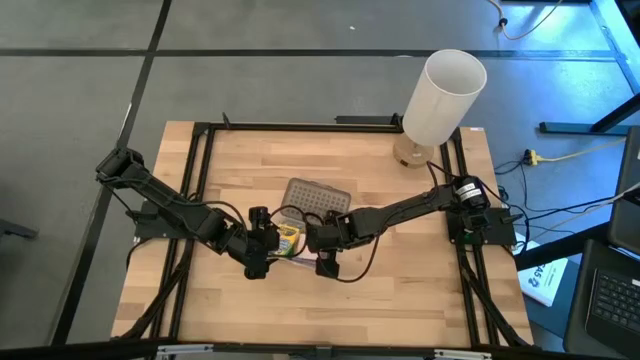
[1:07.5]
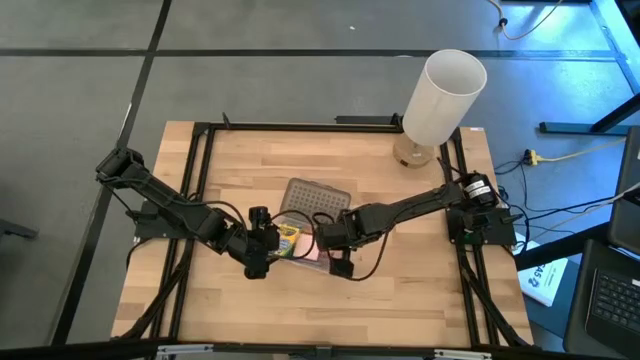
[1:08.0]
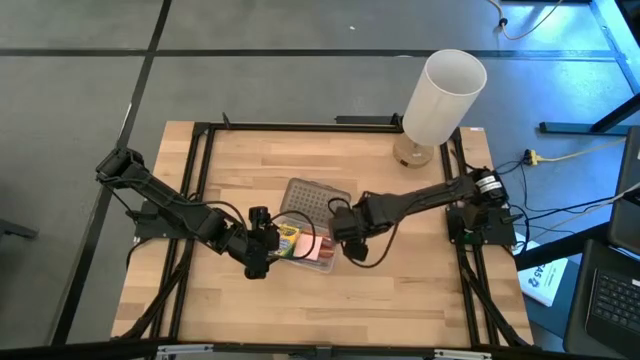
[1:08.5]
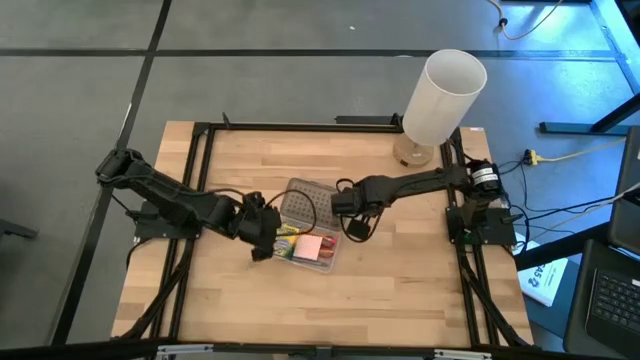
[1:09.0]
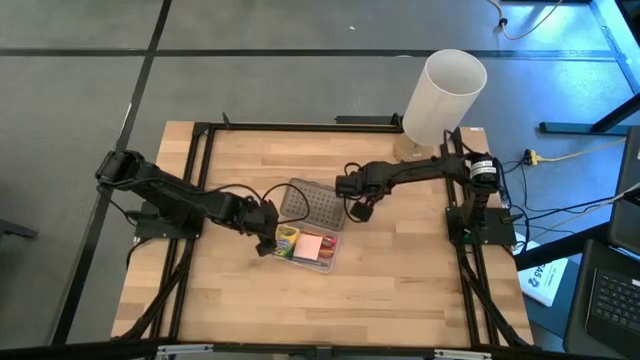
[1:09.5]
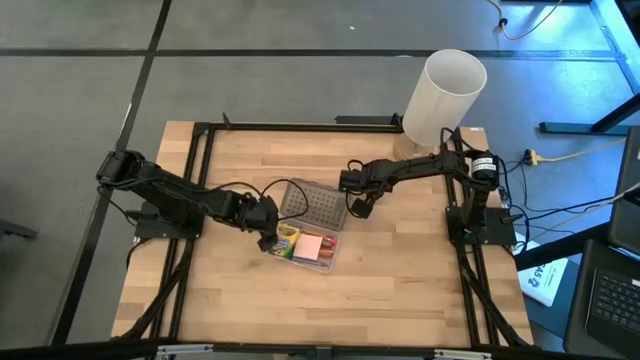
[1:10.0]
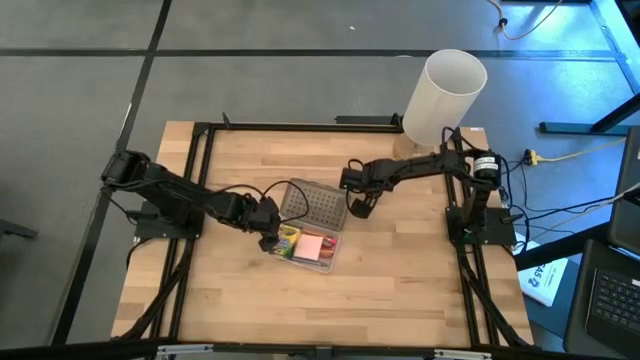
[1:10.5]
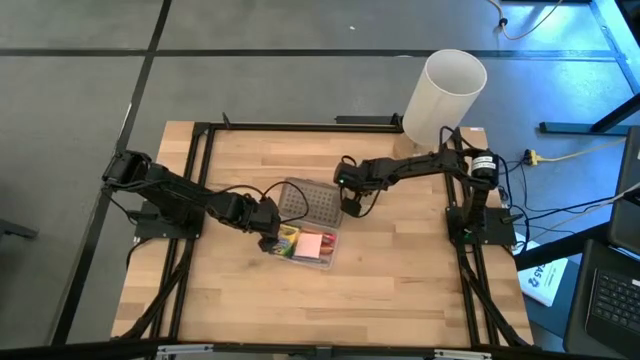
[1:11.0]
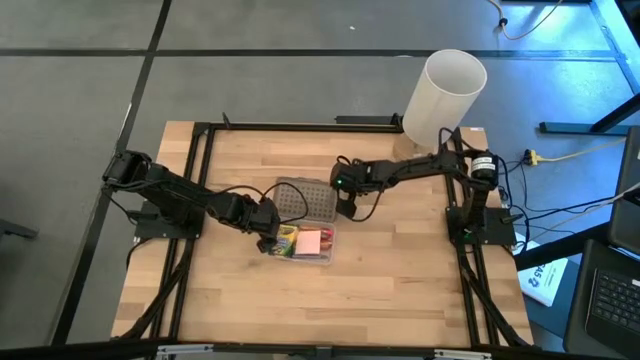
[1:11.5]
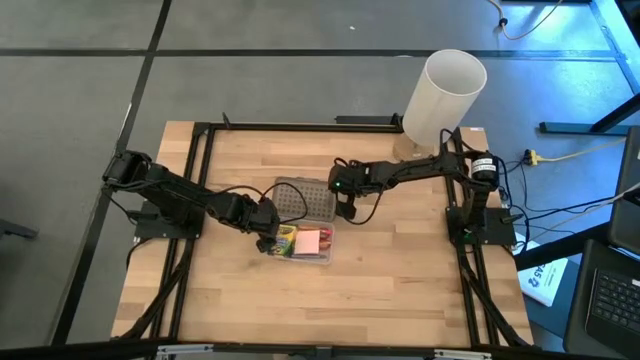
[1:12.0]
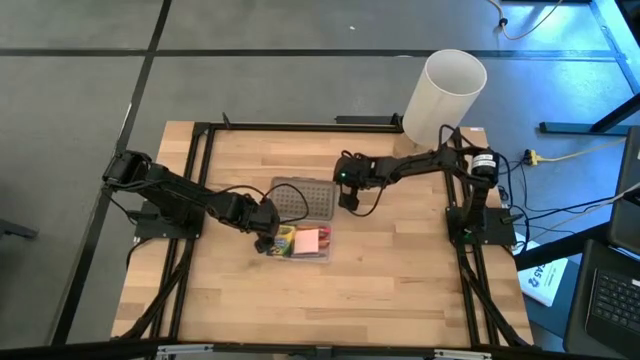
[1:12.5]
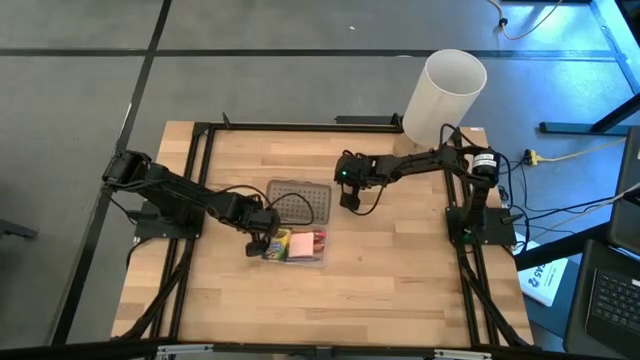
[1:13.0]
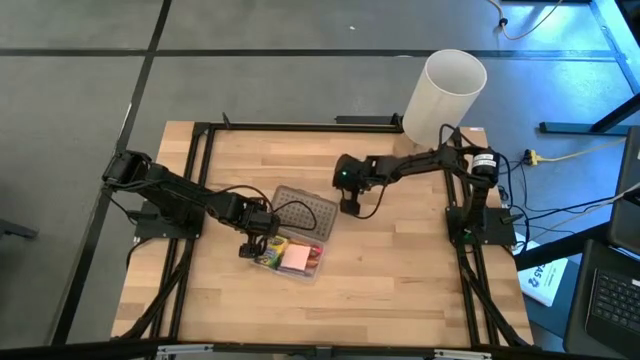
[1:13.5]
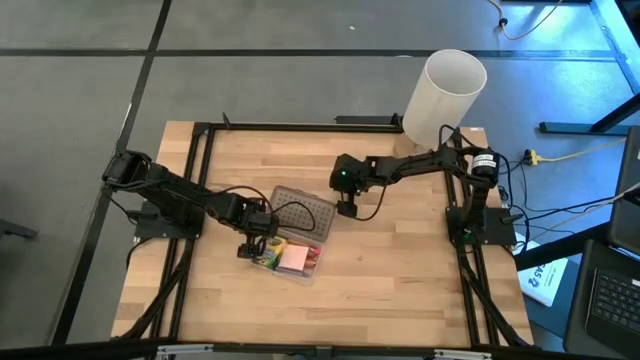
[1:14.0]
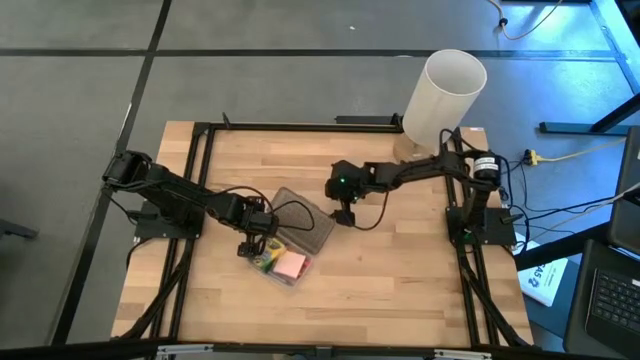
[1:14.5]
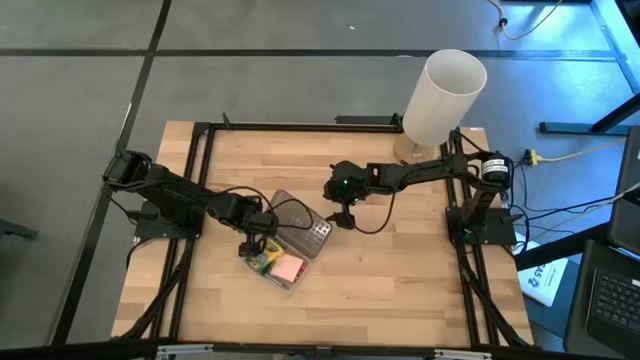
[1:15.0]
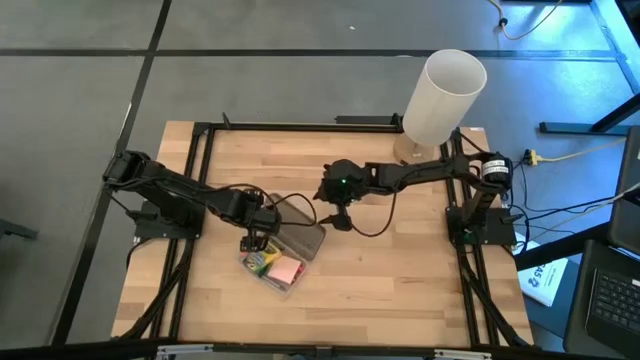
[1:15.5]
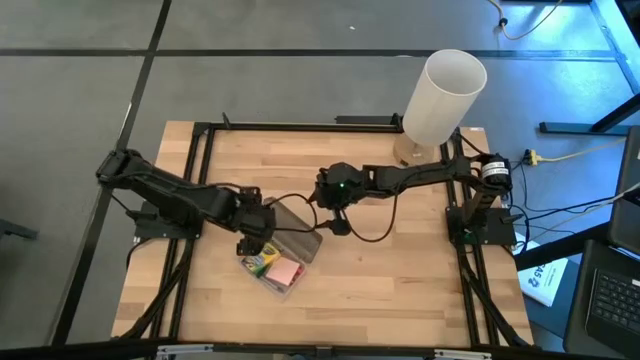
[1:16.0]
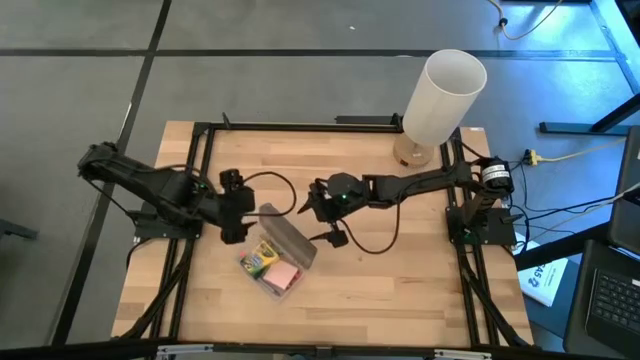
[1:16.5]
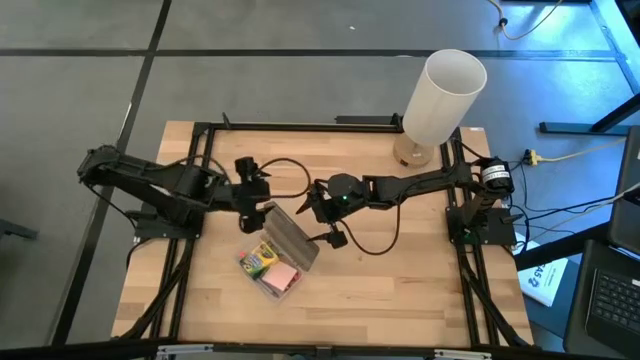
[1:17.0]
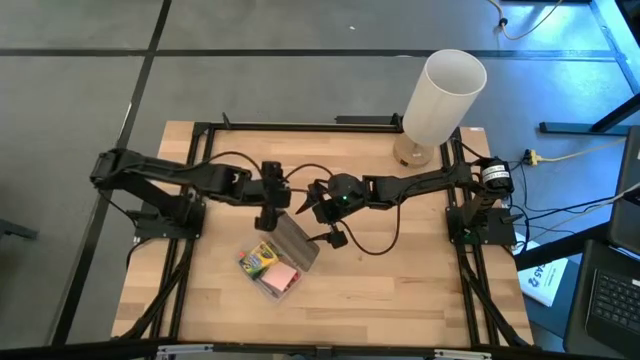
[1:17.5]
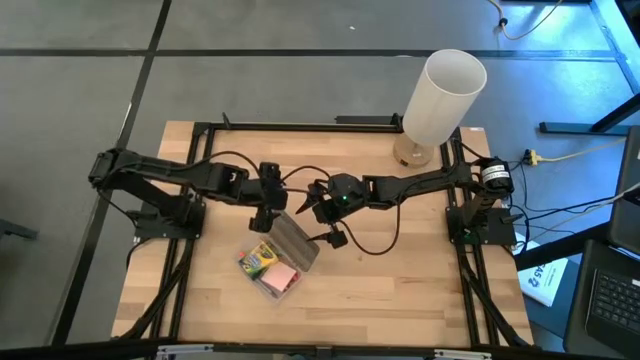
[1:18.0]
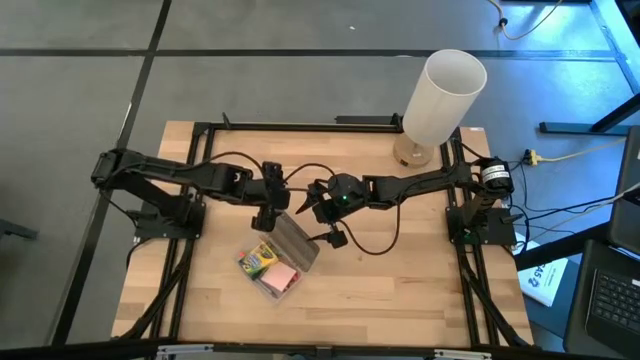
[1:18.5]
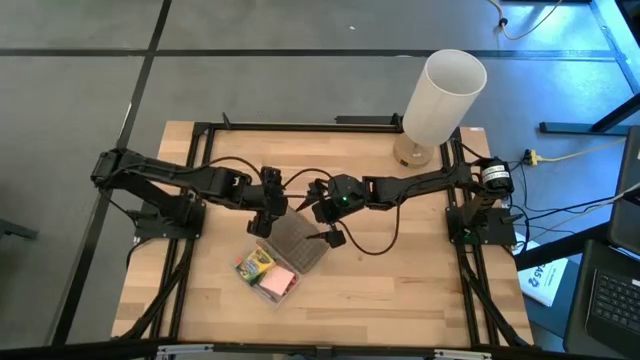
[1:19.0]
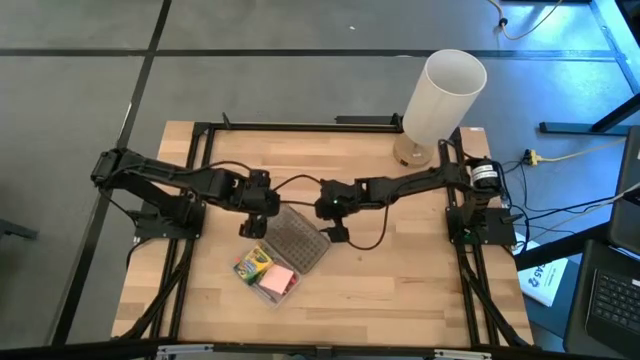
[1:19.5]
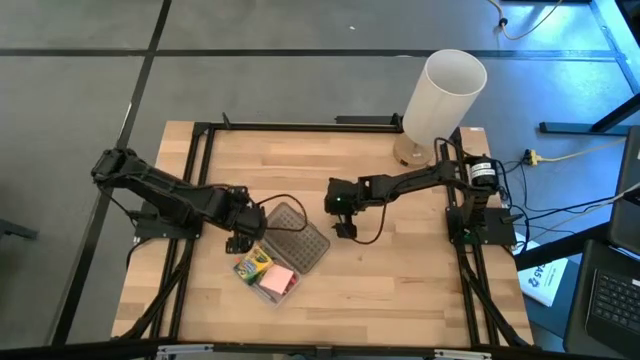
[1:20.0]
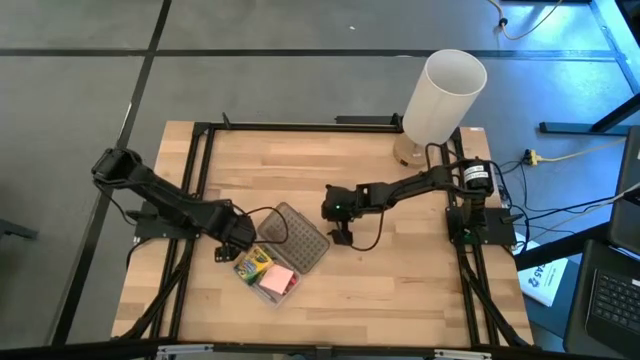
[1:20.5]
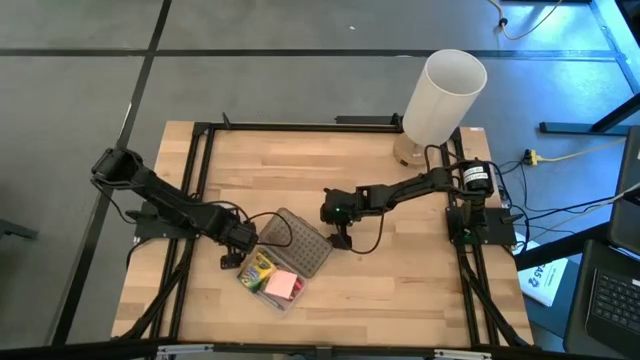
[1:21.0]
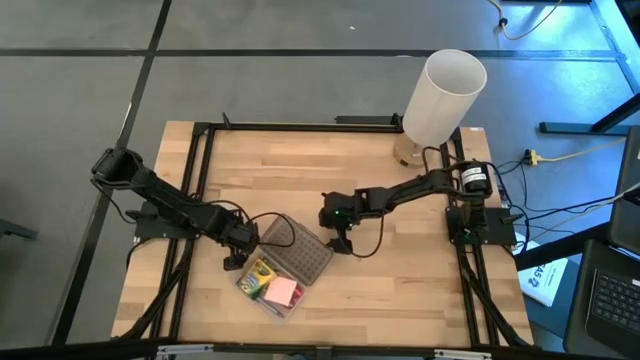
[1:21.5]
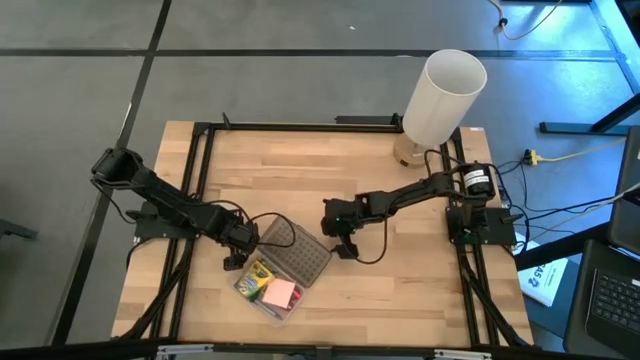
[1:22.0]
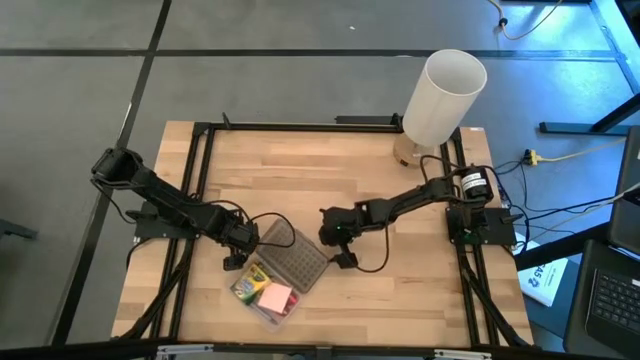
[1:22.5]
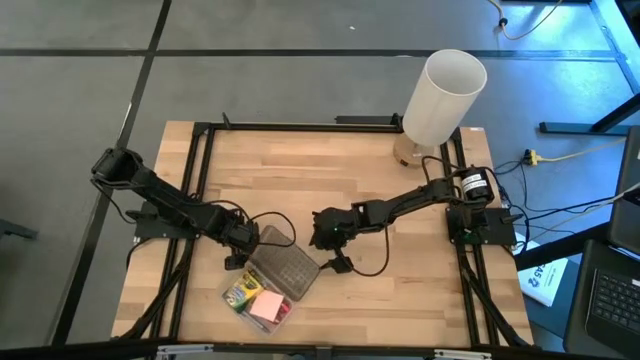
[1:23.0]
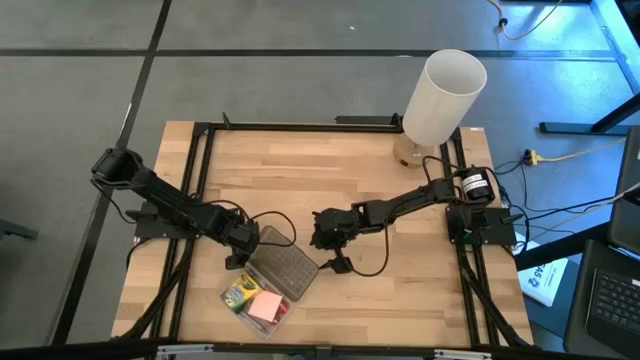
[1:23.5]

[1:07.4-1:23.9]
Task: Pack school essentials
Close the black supply box
